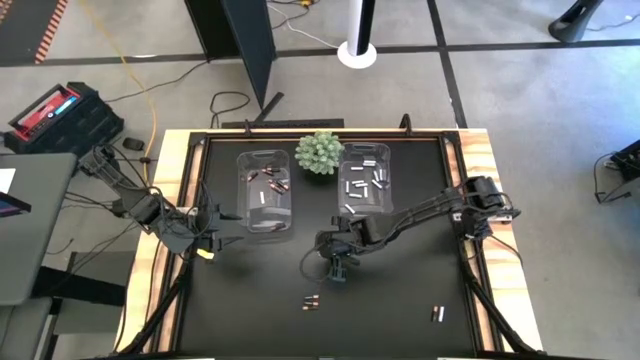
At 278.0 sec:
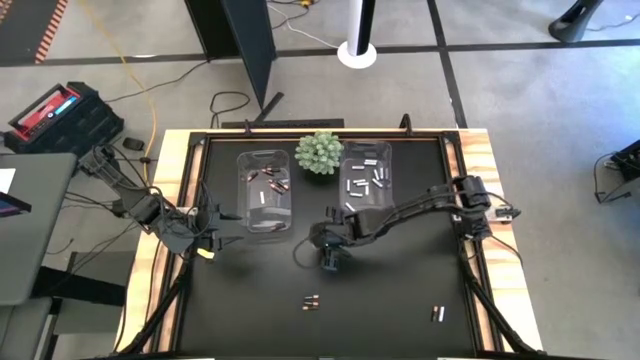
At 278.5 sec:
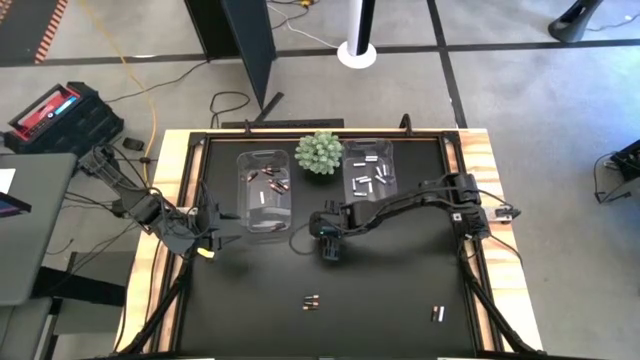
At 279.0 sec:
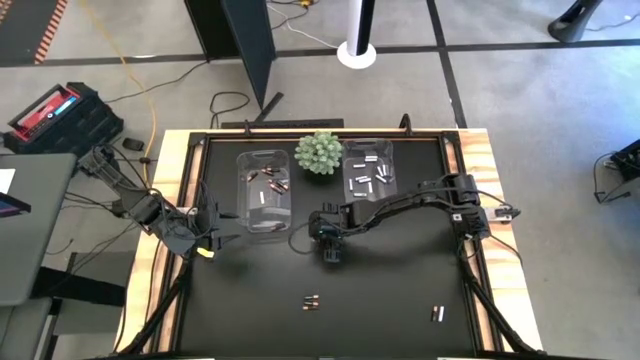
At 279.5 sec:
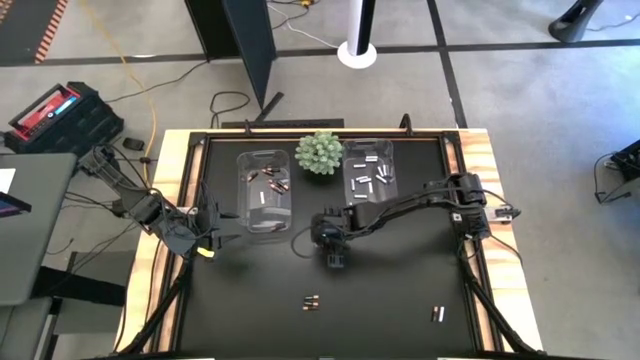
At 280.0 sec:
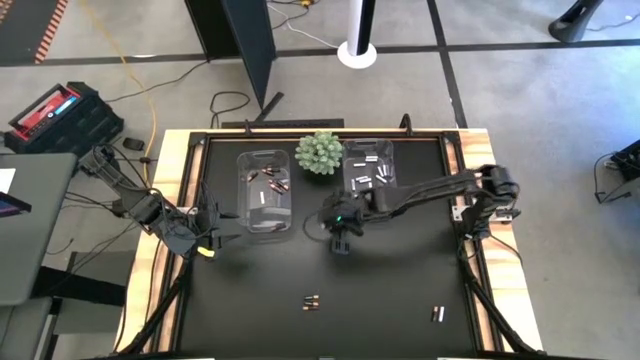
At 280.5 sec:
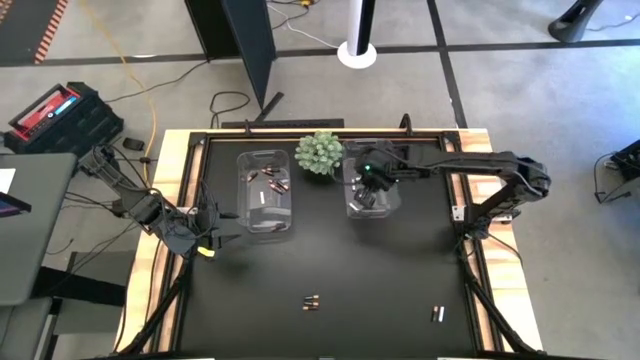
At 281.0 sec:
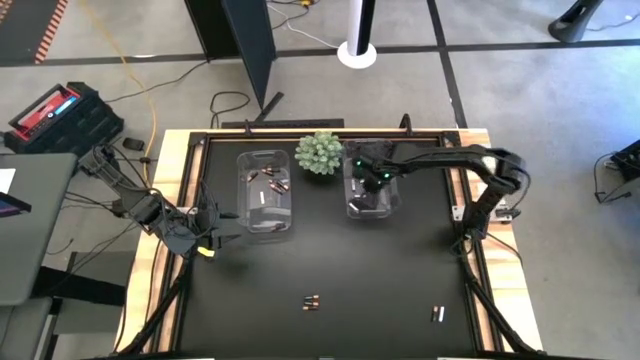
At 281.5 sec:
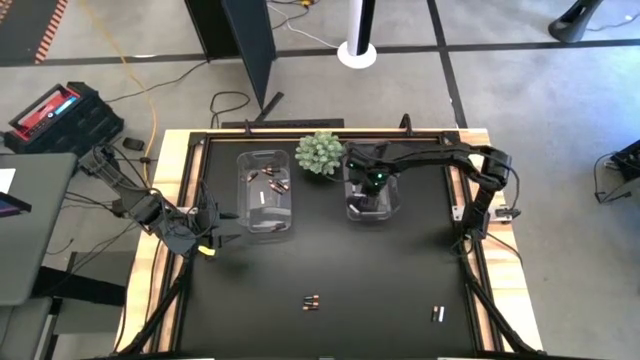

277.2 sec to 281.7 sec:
Task: Sort batteries
Put the white-blue battery into the right transparent bin

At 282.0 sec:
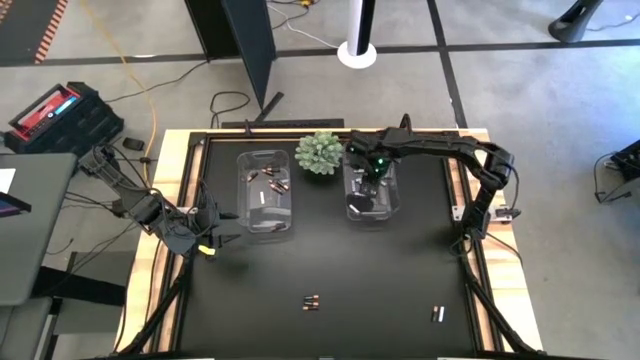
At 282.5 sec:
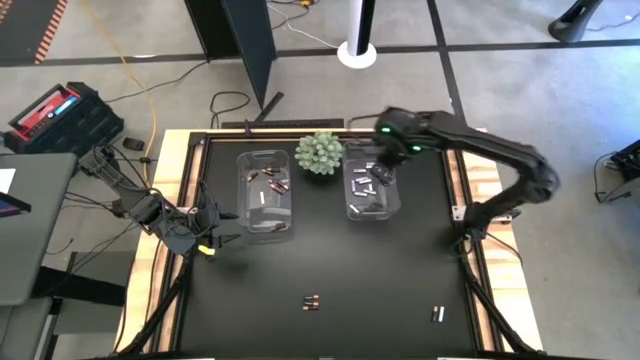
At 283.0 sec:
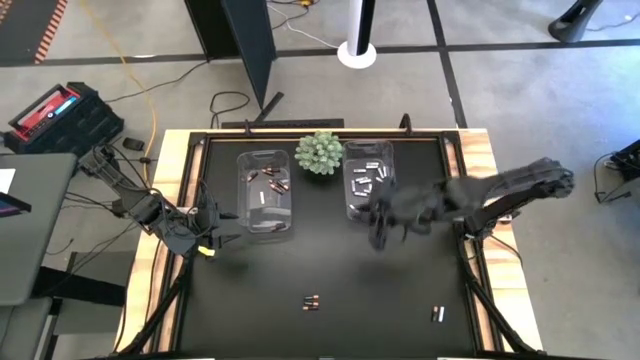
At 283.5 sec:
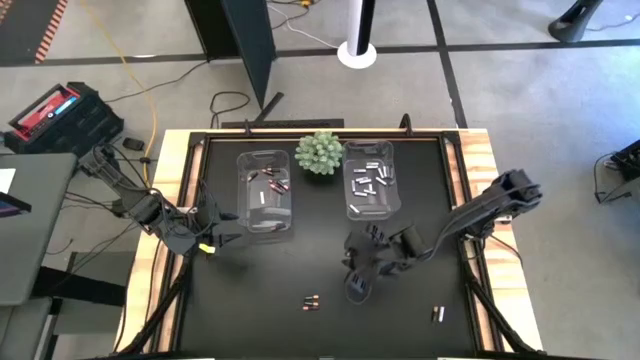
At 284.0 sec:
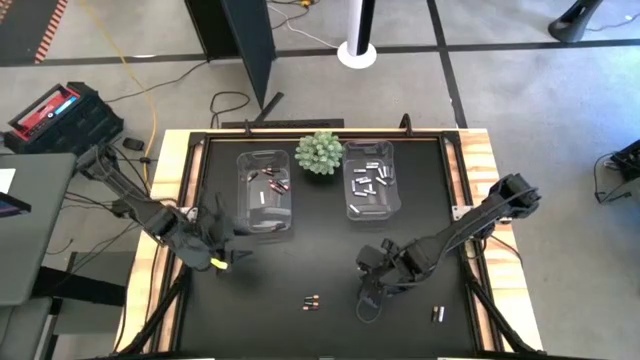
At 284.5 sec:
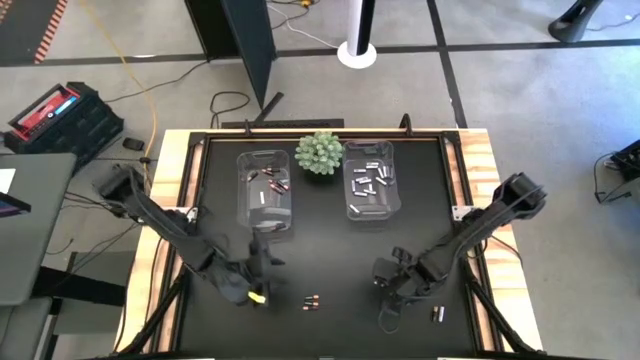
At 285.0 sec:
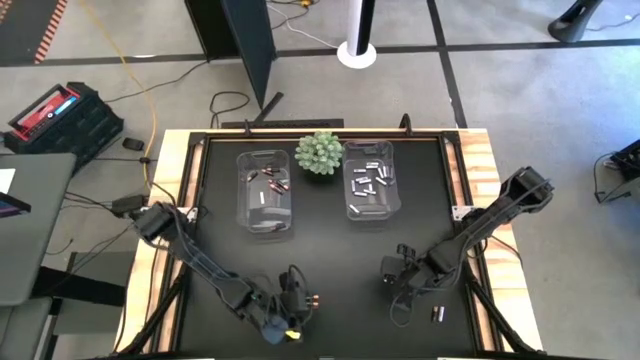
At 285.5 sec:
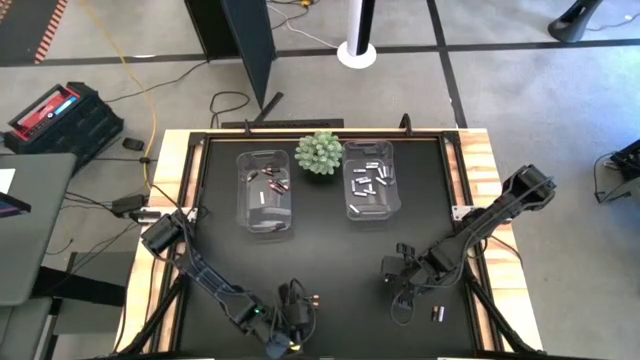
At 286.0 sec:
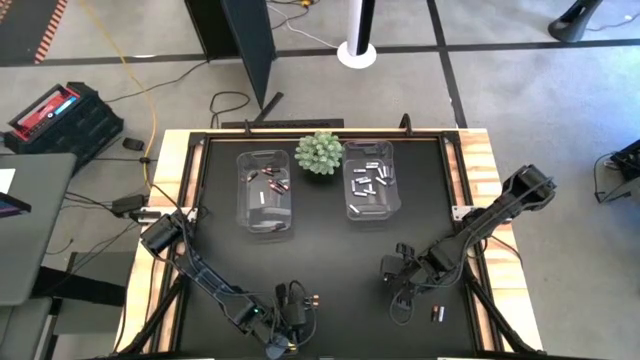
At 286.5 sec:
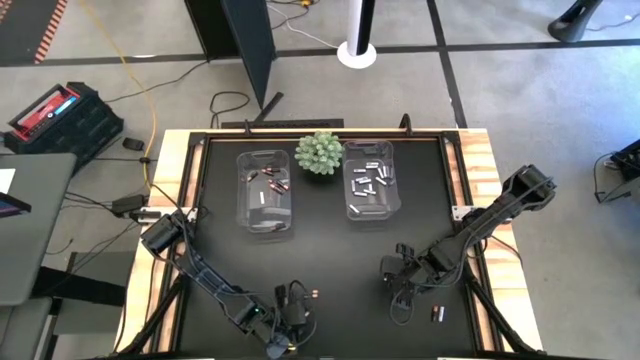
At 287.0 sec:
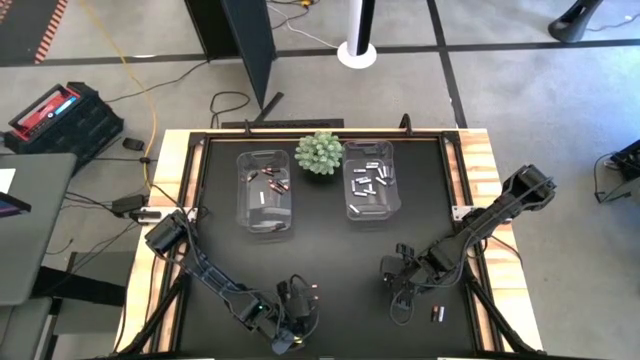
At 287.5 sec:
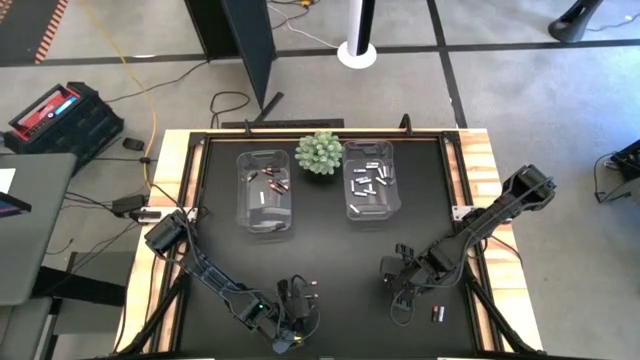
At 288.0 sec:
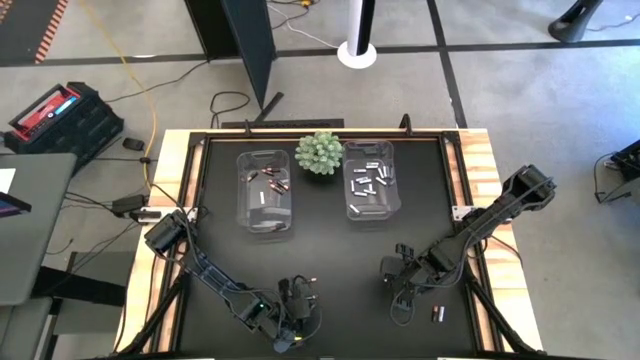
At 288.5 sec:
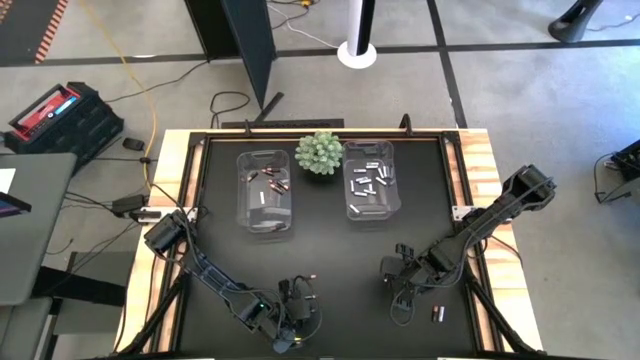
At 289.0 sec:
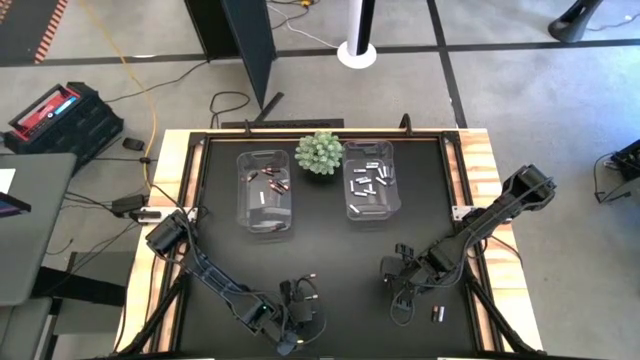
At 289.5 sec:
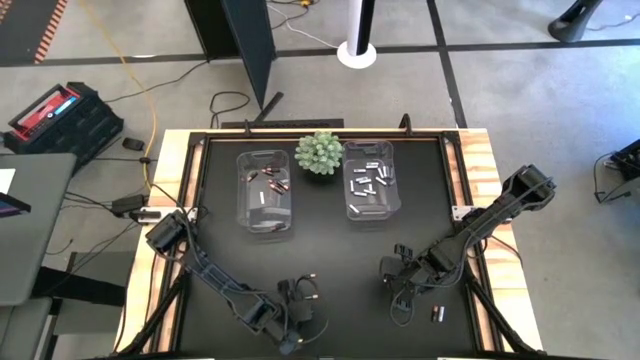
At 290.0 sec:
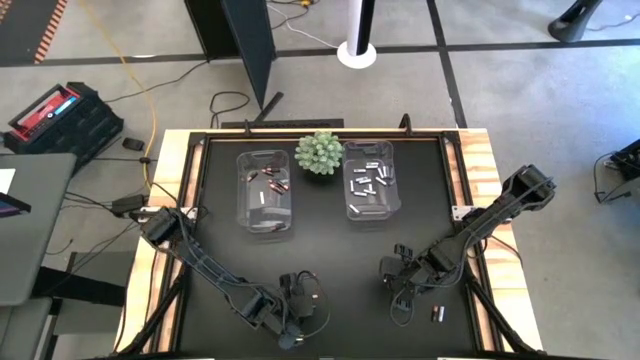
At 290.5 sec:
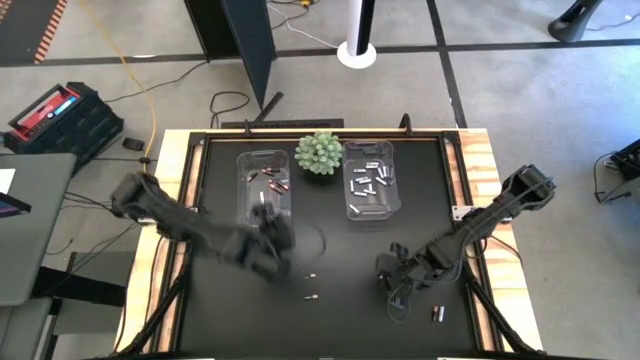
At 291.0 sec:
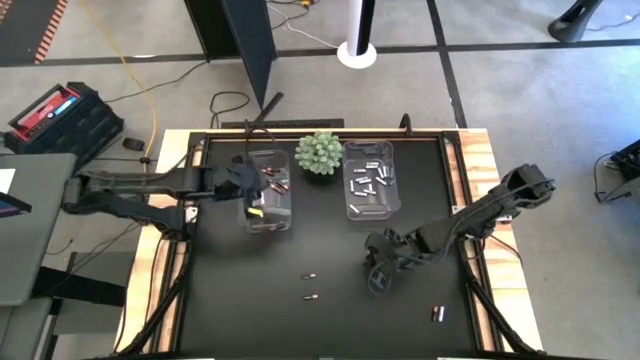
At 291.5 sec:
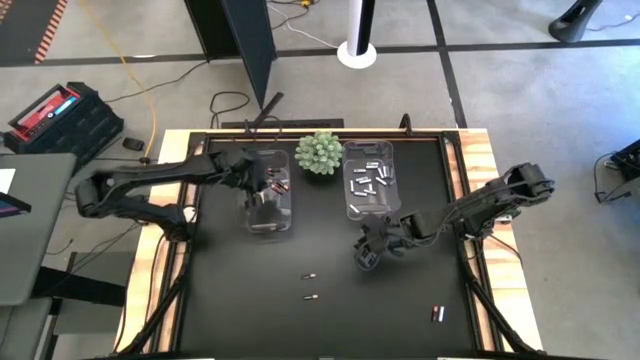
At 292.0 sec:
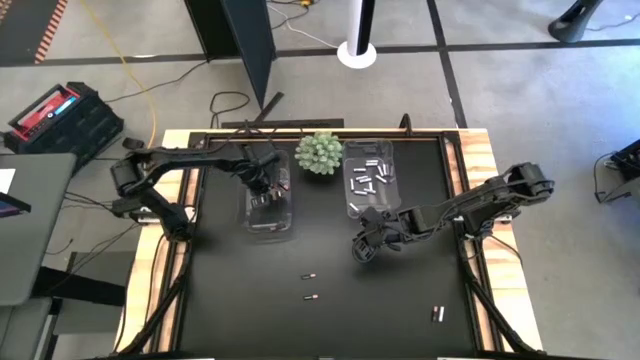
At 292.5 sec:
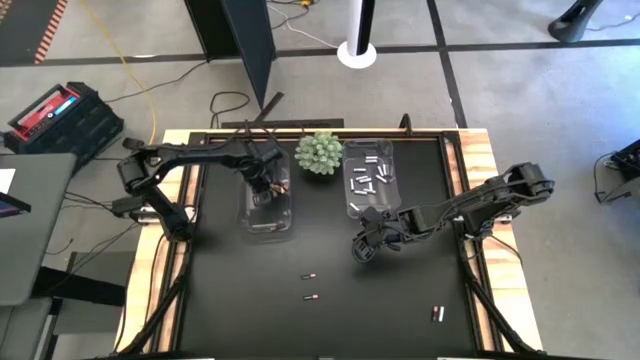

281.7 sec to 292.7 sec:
Put the black-brown battery into the left transparent bin

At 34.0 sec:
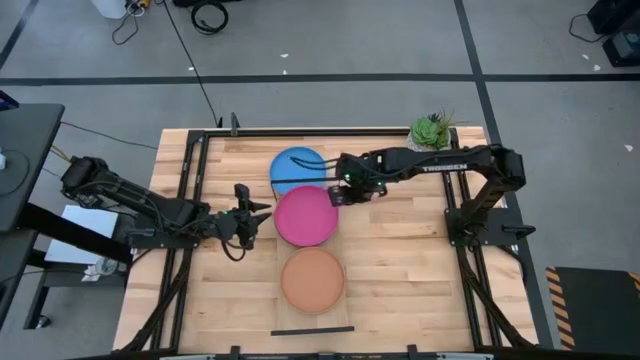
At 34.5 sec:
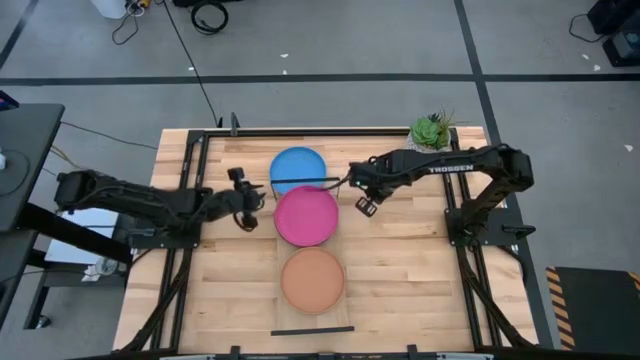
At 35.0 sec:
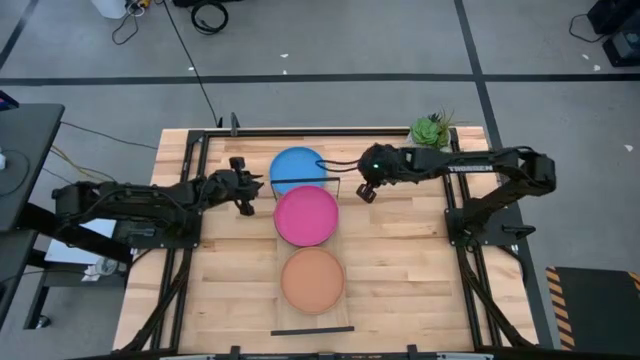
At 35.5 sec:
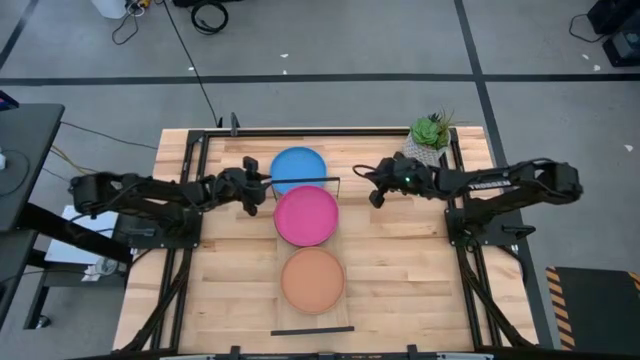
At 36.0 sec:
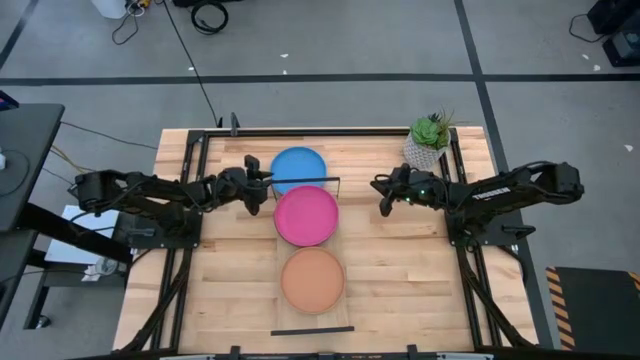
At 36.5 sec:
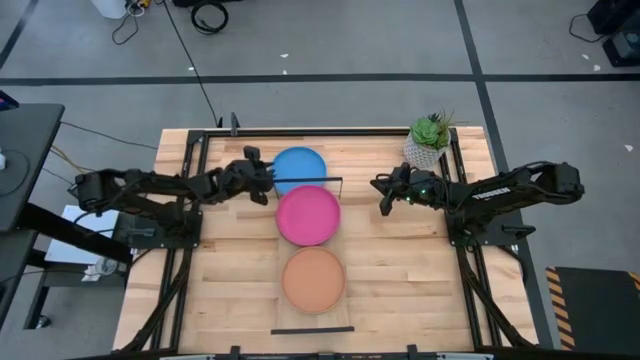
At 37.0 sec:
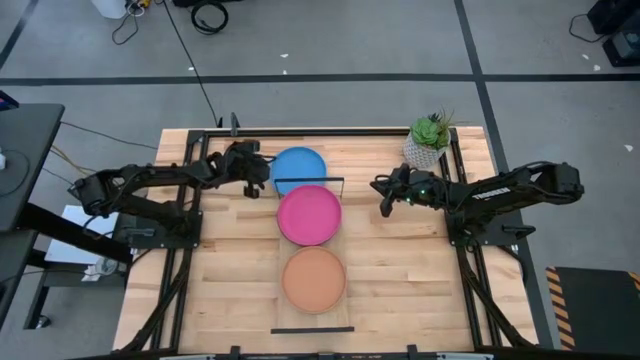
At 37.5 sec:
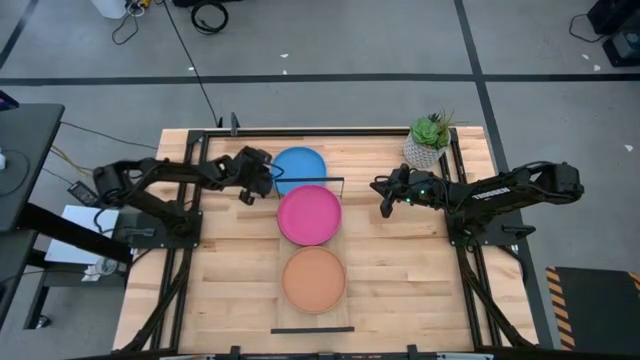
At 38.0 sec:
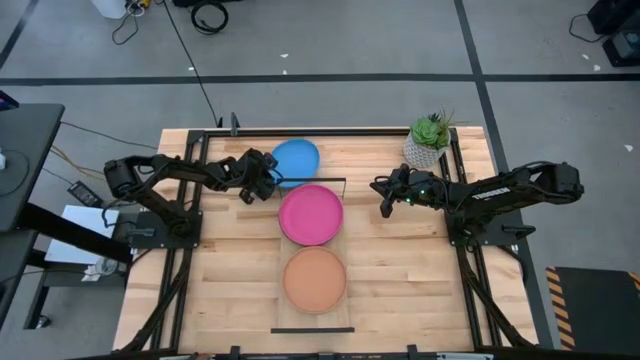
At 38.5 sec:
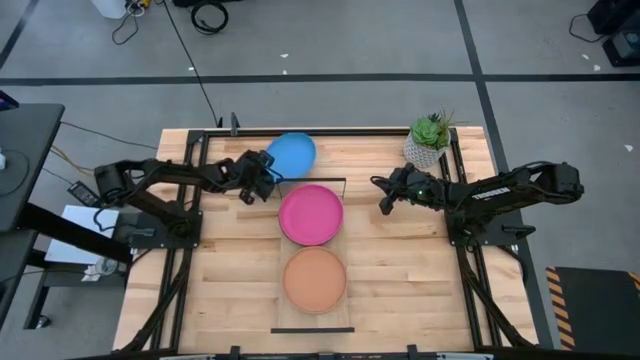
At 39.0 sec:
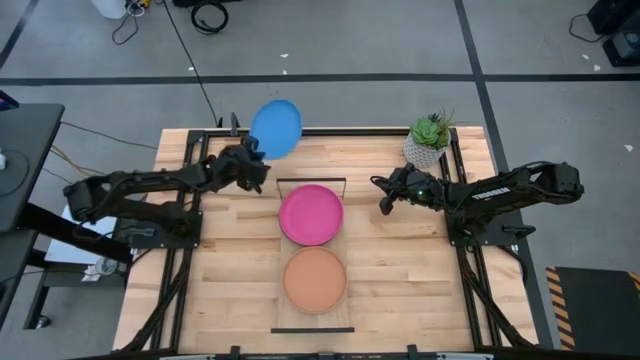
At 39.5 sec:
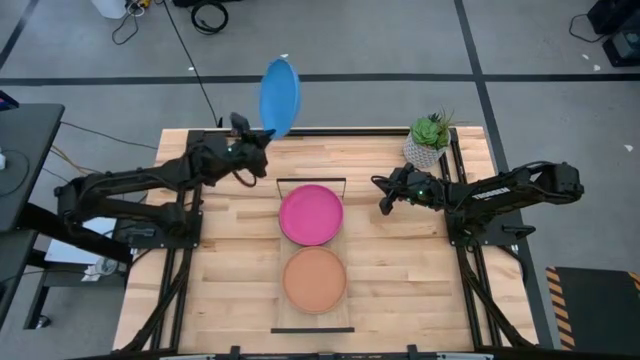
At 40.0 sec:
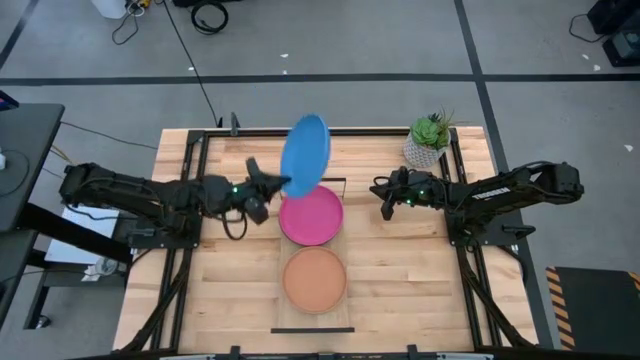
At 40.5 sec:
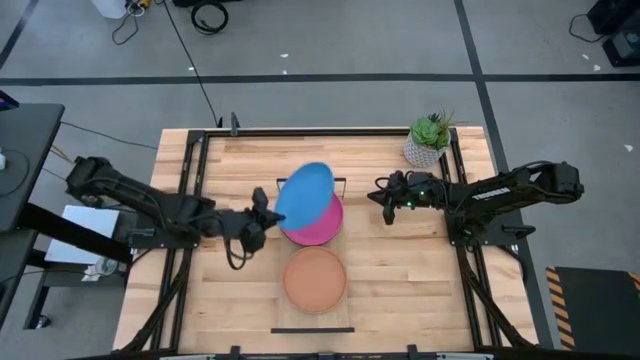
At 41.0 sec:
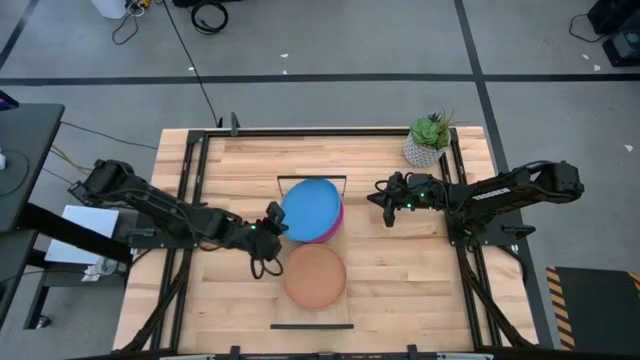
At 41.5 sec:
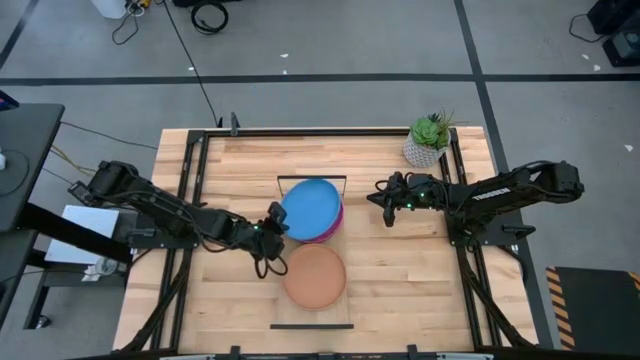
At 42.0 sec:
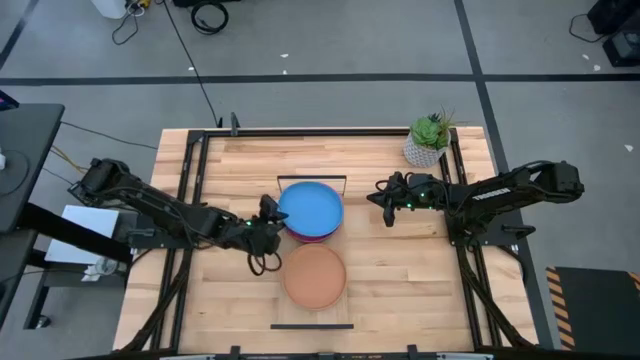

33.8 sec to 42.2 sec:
Task: Place and stack plates onto a shelf
Stack the blue plate on top of the pink plate on the shelf
